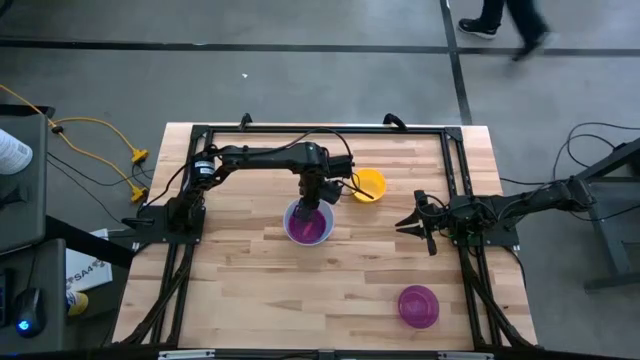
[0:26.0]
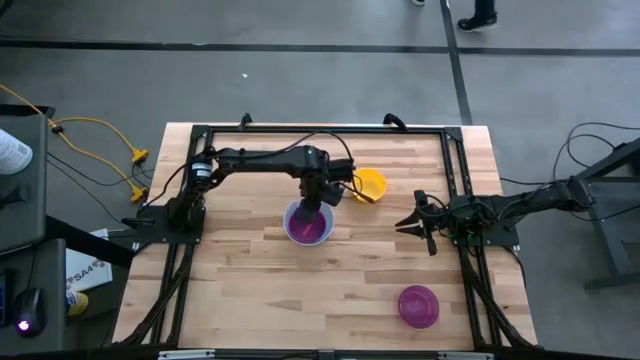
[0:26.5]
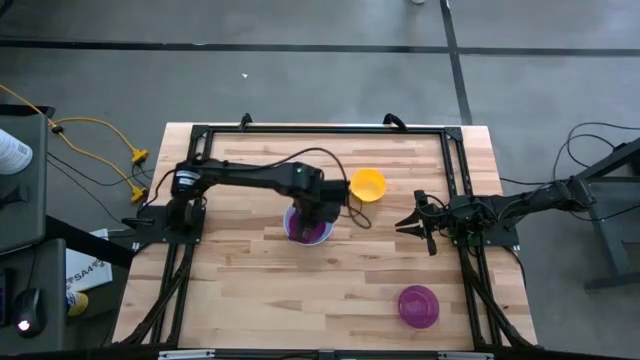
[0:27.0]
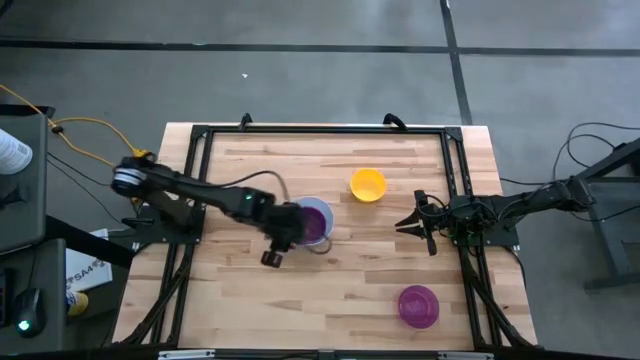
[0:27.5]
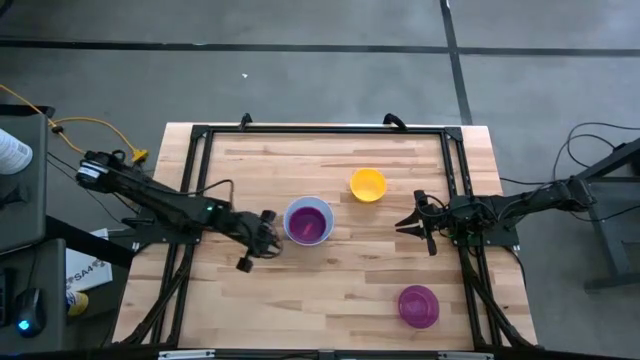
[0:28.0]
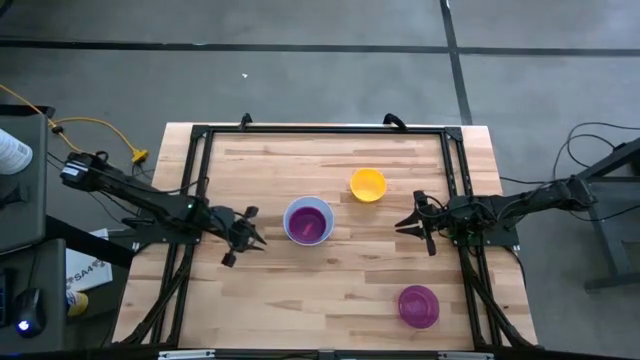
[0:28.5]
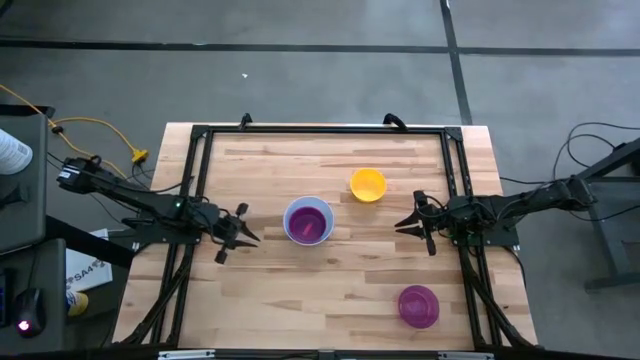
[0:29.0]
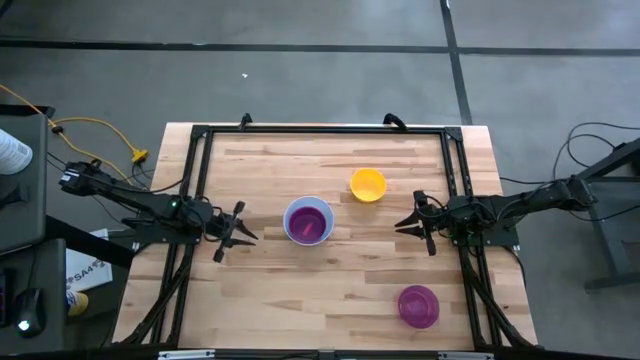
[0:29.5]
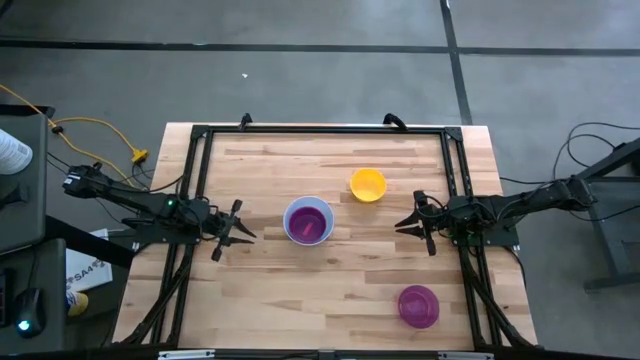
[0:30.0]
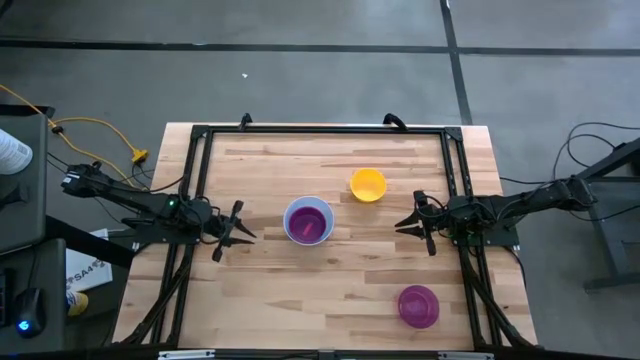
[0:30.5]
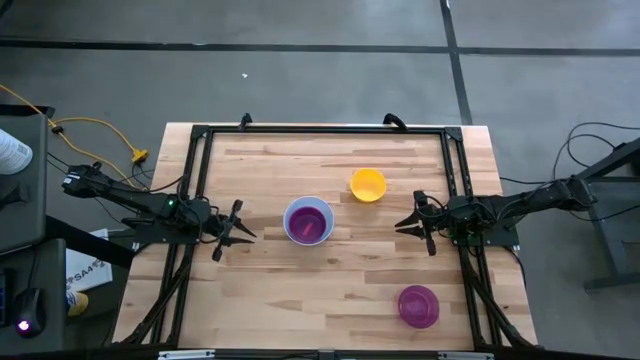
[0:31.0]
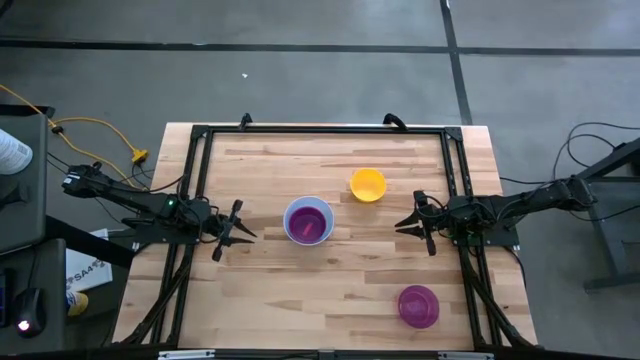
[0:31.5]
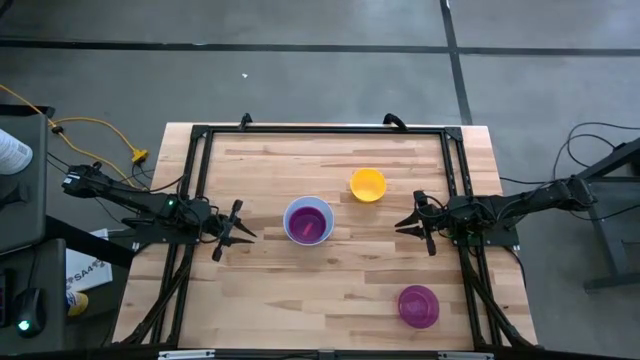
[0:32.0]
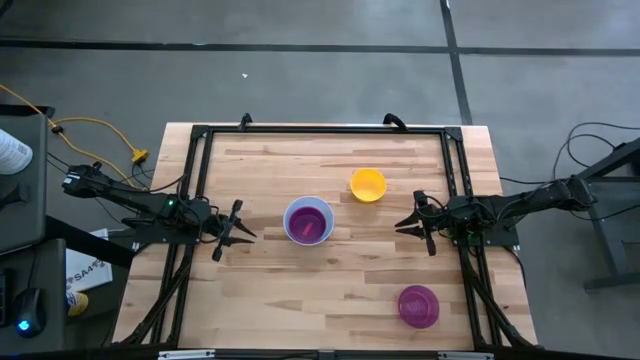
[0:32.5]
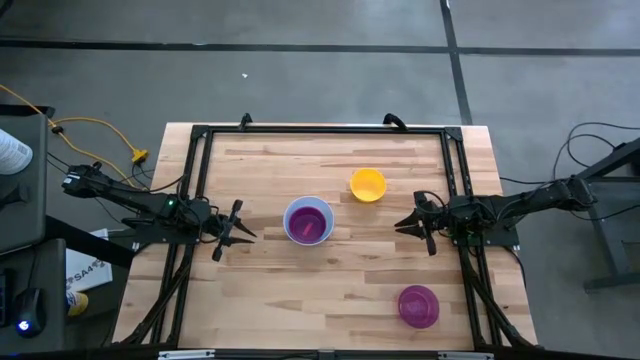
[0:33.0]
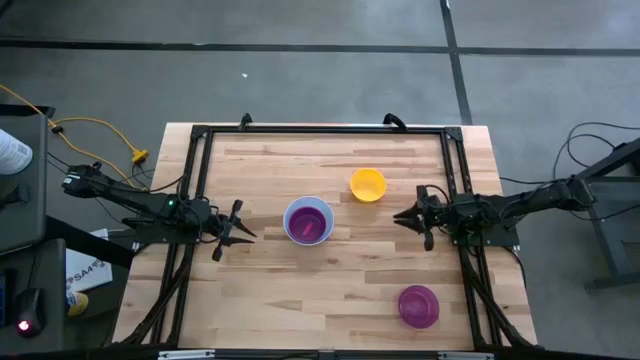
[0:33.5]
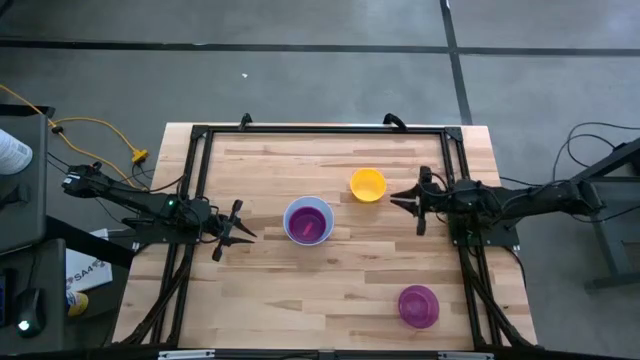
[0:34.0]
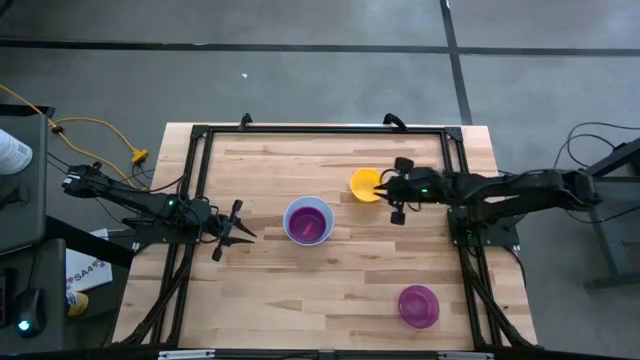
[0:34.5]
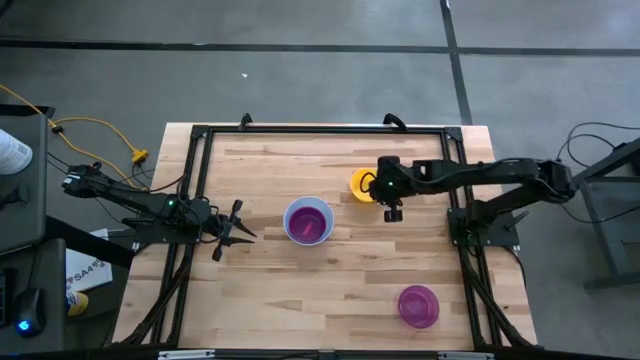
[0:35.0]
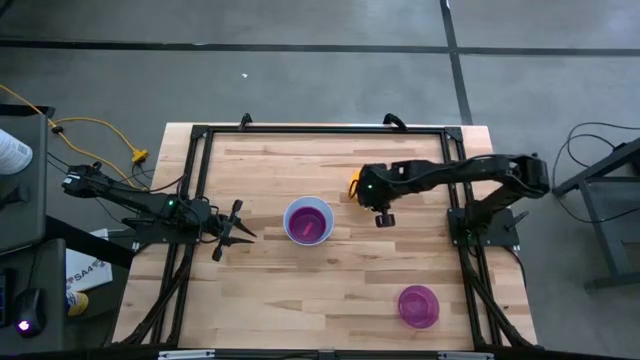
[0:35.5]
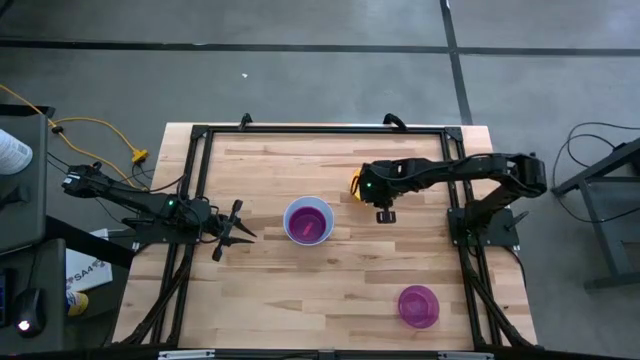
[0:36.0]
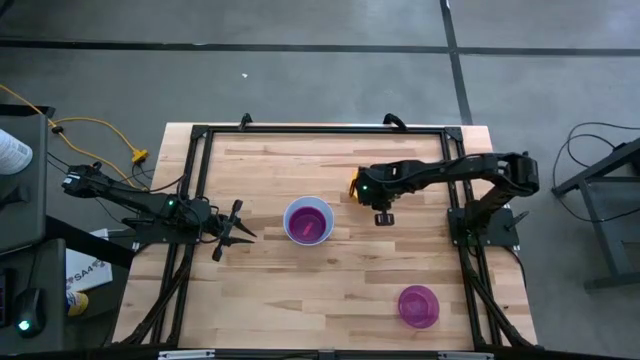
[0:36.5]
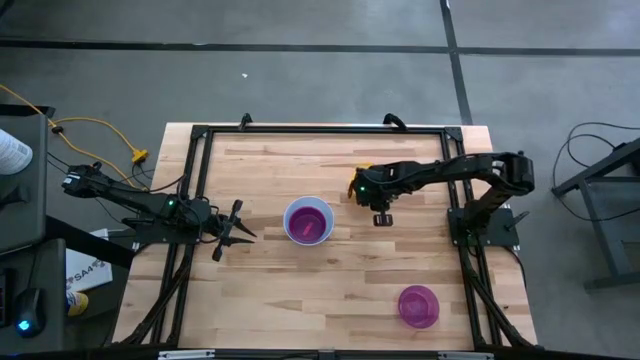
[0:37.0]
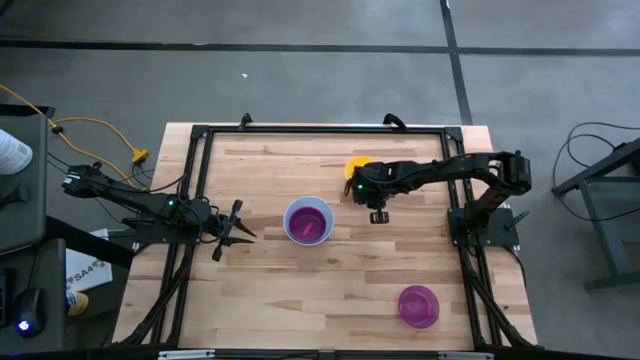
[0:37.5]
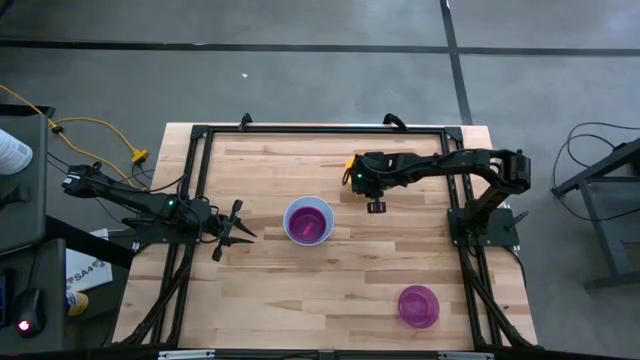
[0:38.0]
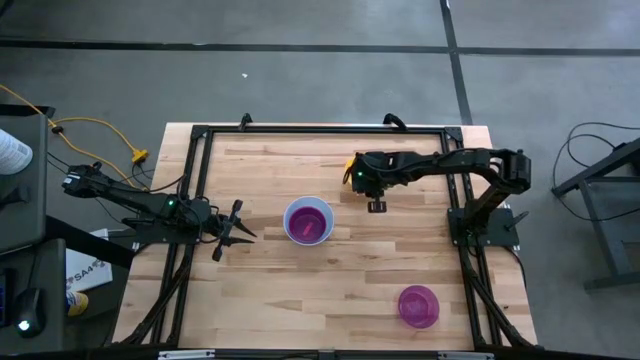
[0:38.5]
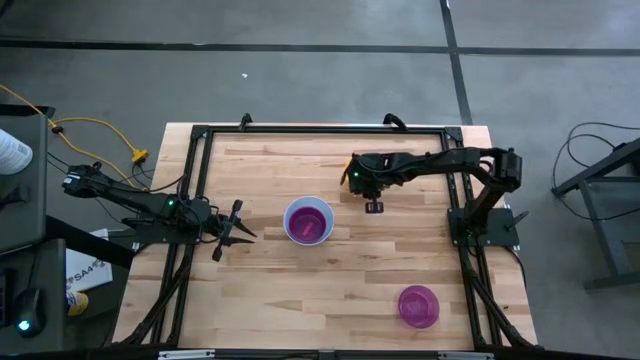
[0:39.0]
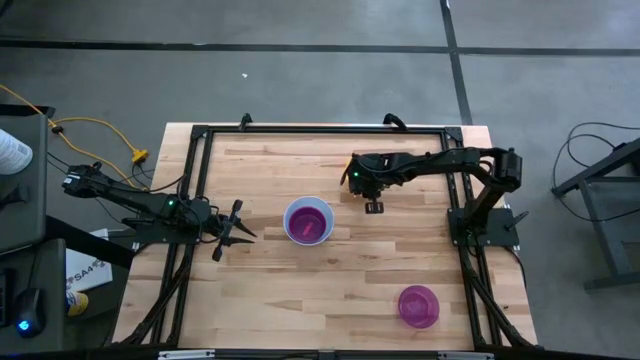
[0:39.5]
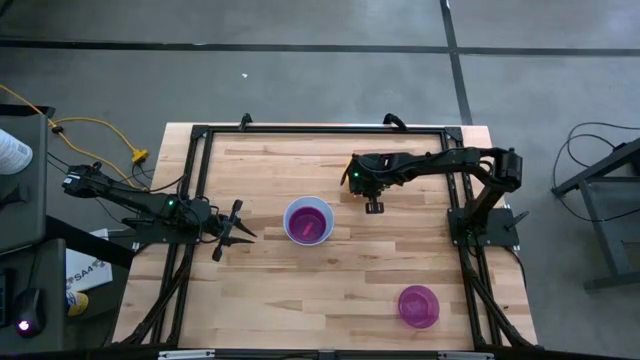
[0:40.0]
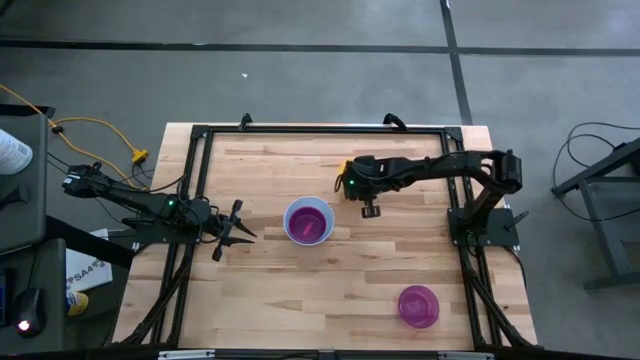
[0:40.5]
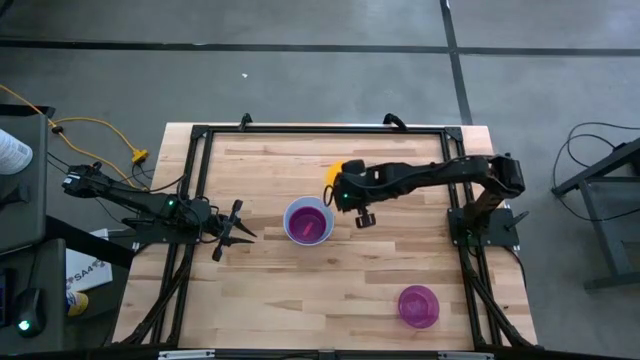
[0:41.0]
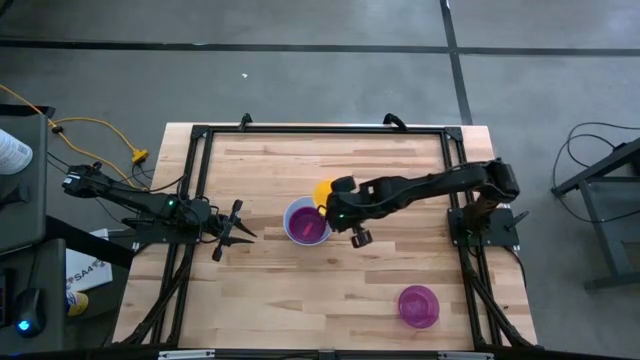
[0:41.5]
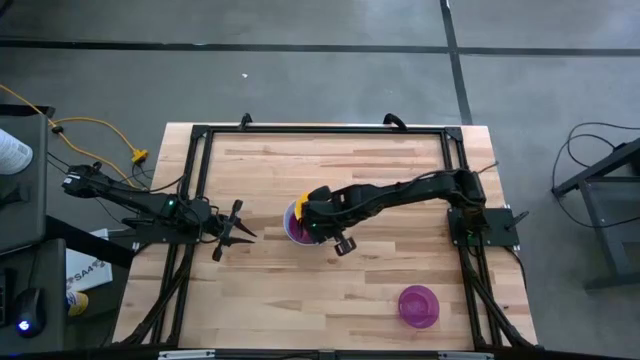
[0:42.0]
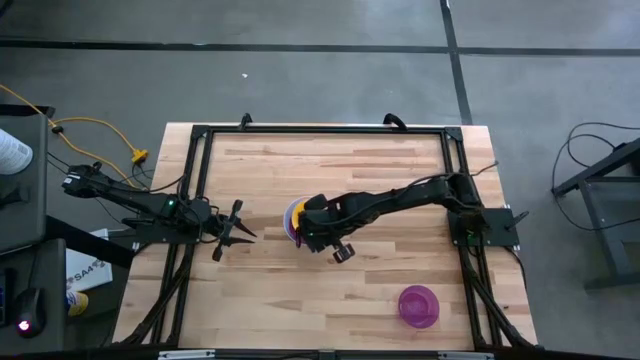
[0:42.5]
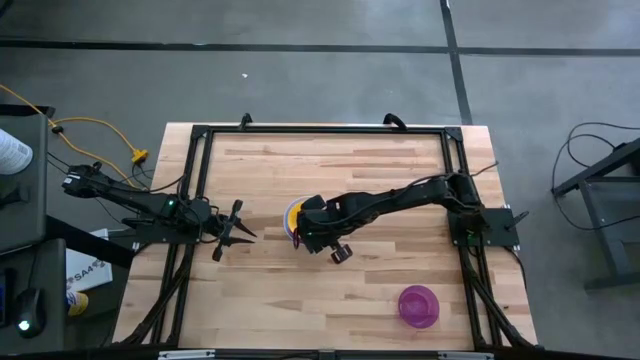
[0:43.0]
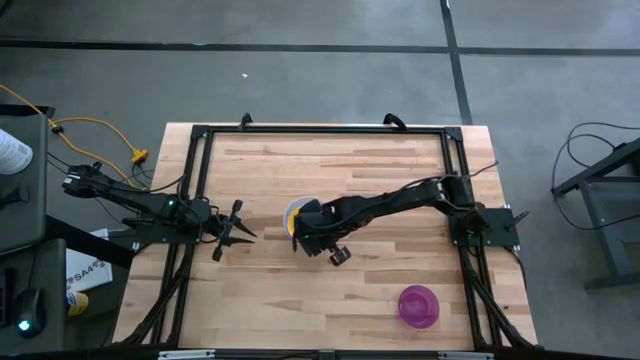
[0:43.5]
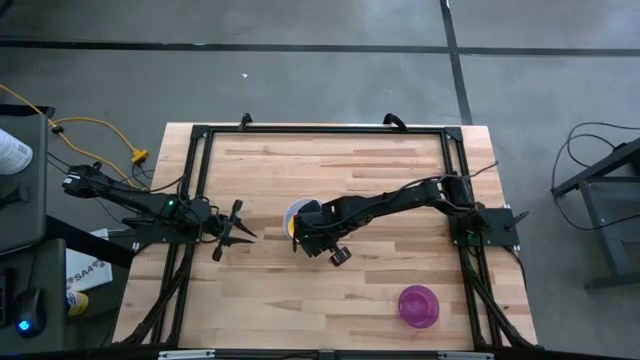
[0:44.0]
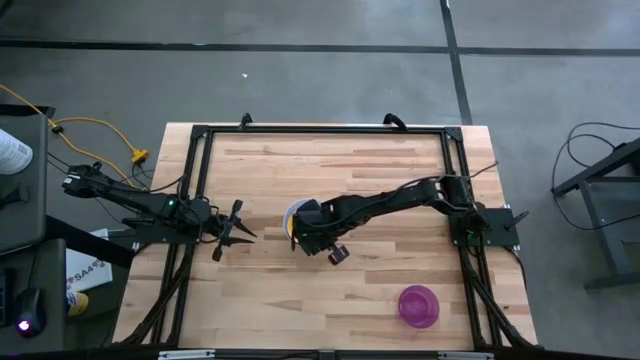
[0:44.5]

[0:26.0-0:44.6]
Stack the yellow bowl on top of the pink bowl

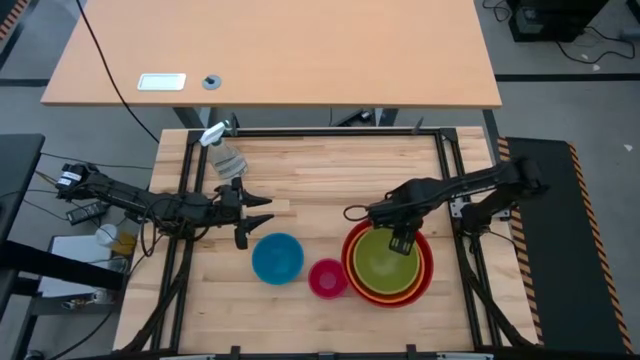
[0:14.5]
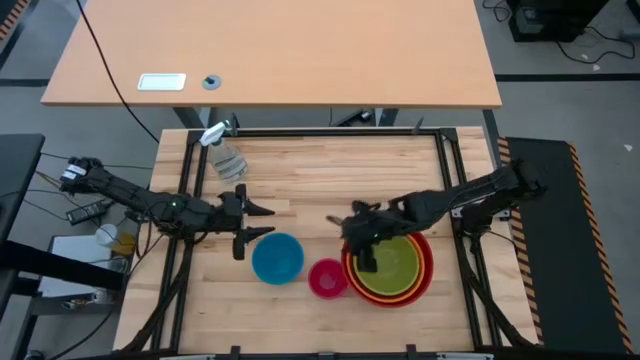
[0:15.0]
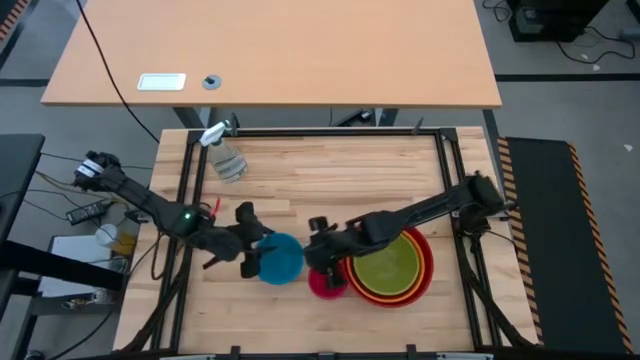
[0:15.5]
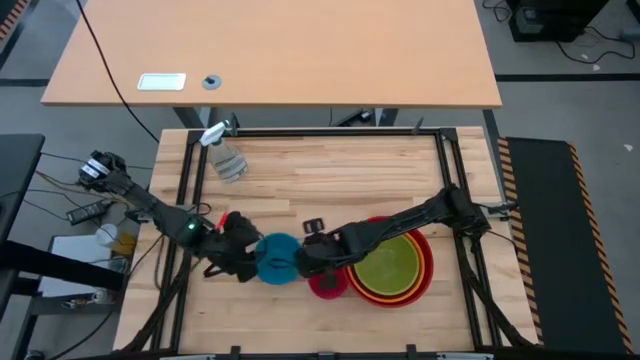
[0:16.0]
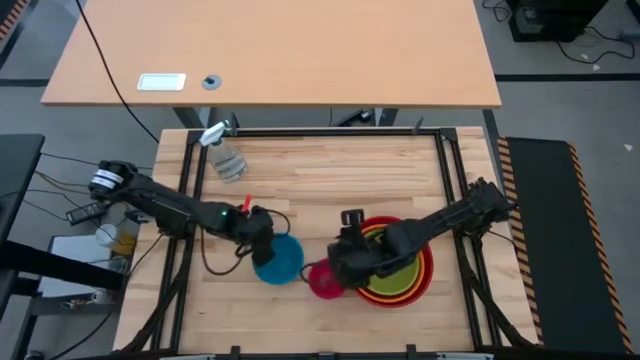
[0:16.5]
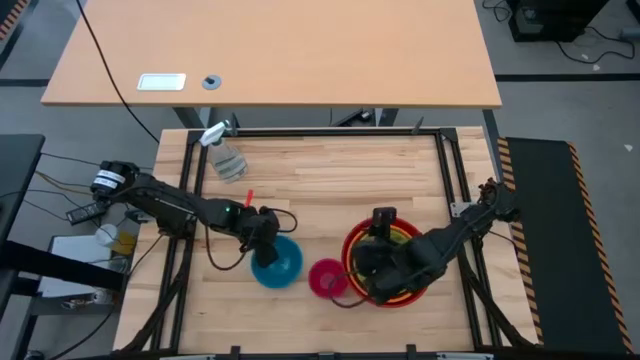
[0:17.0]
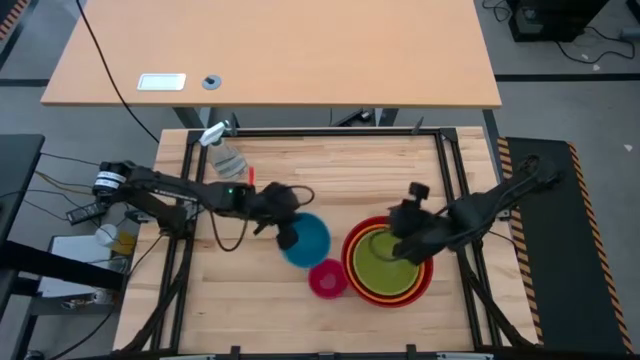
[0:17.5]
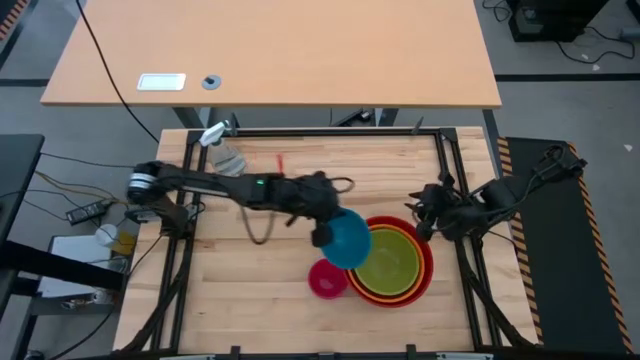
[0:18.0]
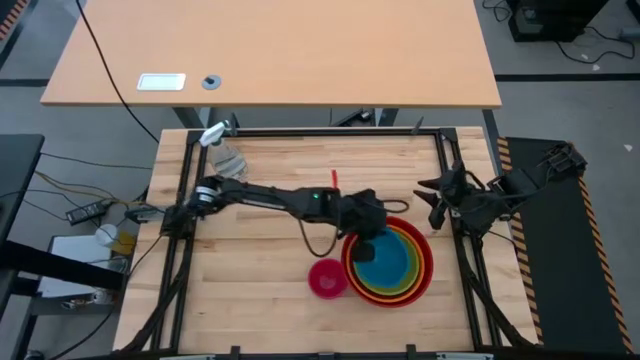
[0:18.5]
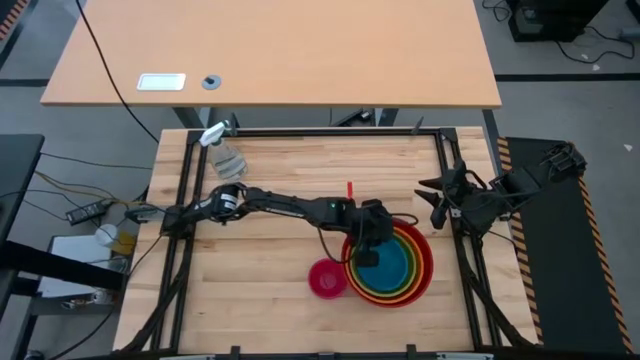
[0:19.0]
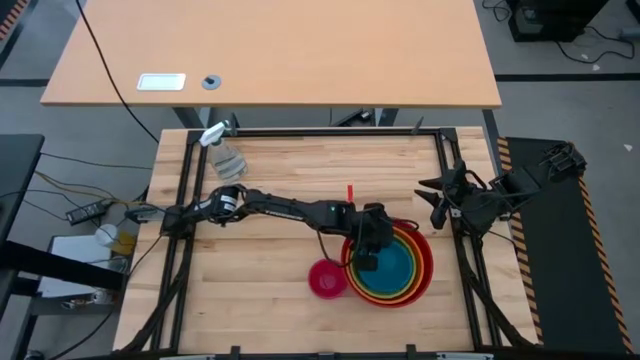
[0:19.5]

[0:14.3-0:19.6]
Stack the blue bowl on the green bowl
